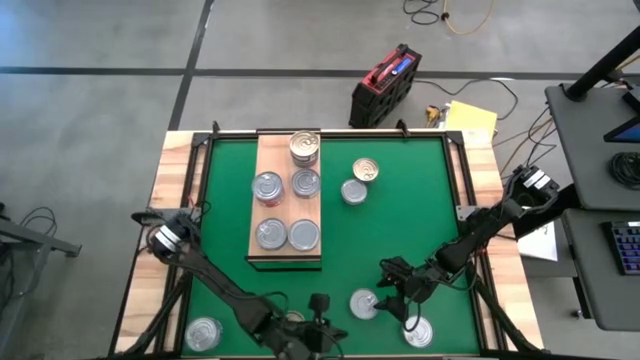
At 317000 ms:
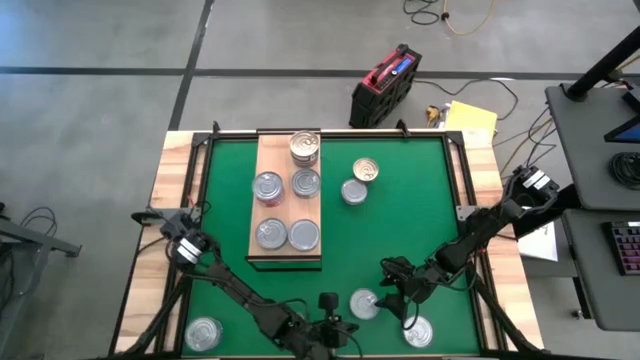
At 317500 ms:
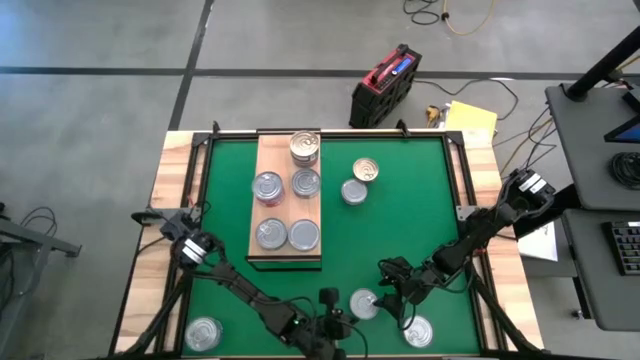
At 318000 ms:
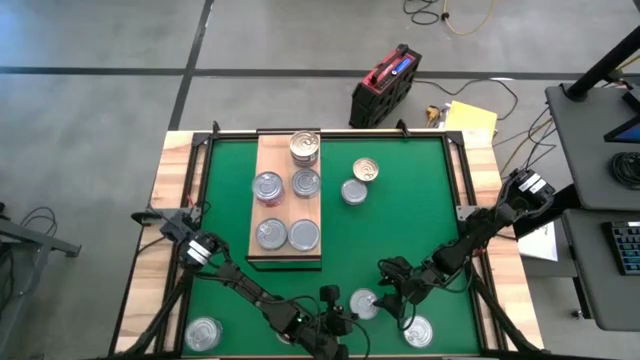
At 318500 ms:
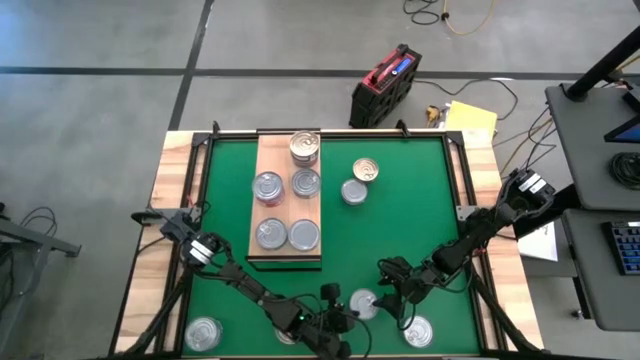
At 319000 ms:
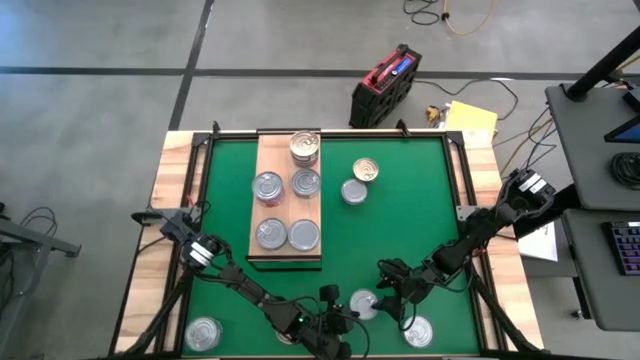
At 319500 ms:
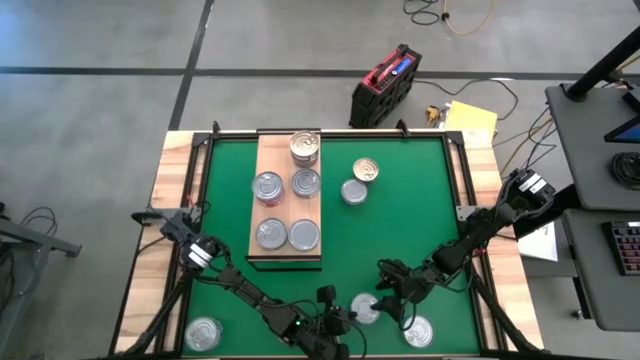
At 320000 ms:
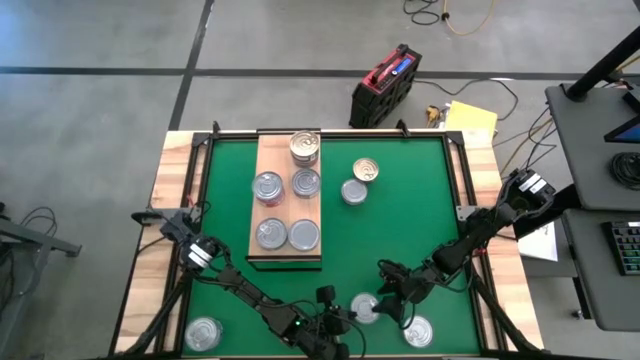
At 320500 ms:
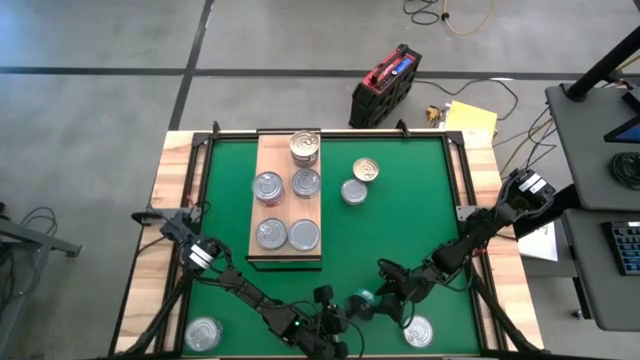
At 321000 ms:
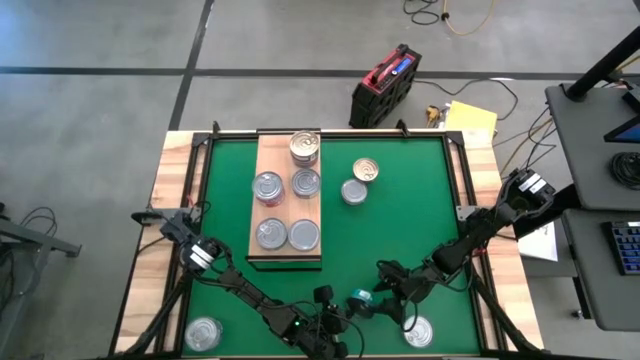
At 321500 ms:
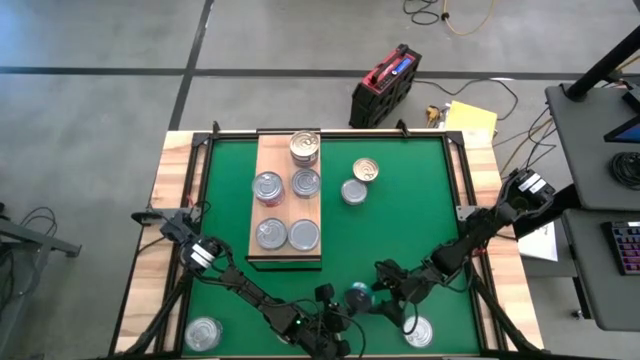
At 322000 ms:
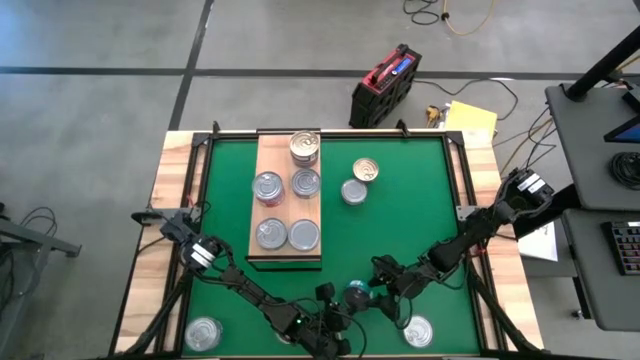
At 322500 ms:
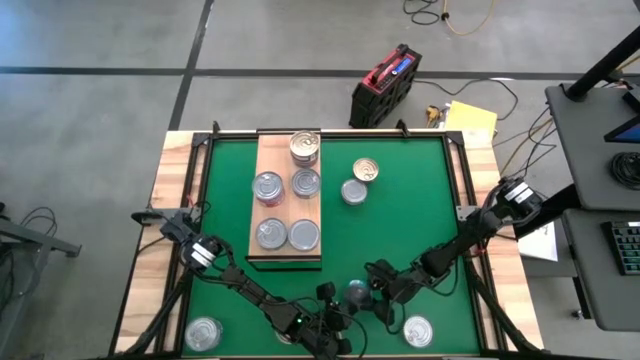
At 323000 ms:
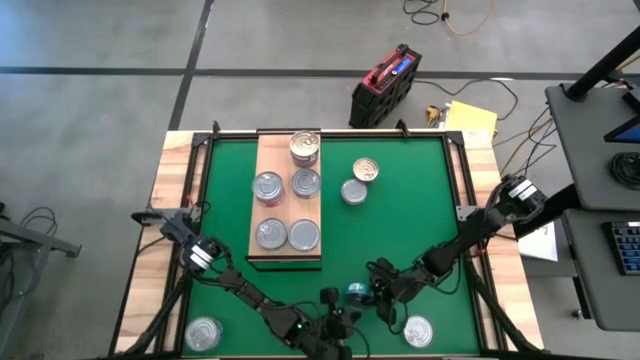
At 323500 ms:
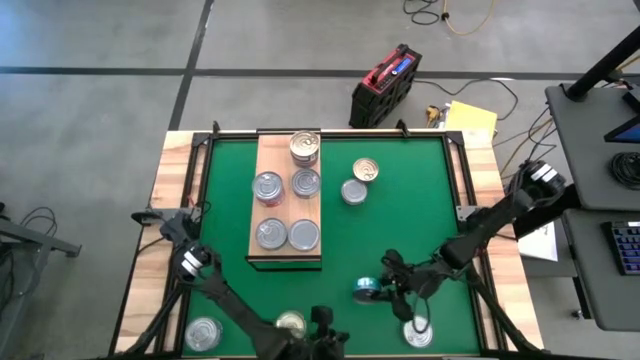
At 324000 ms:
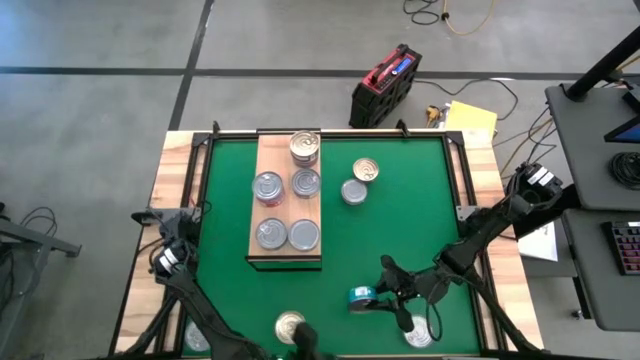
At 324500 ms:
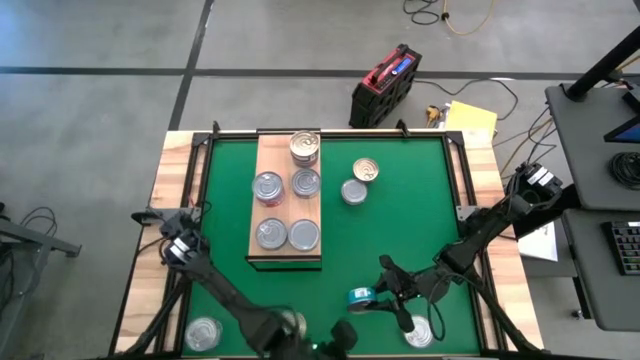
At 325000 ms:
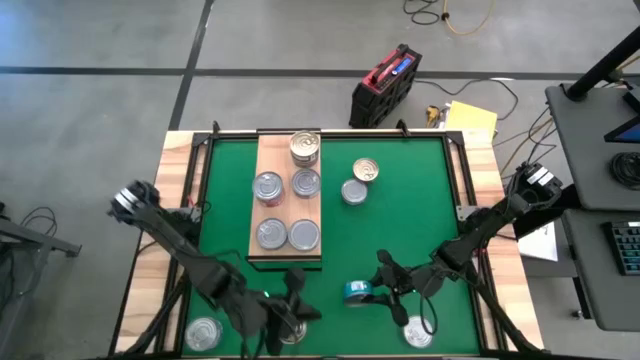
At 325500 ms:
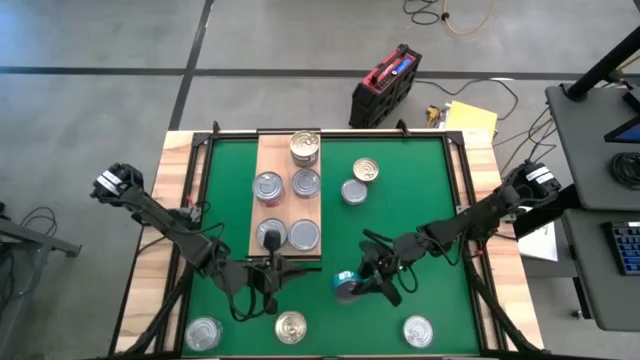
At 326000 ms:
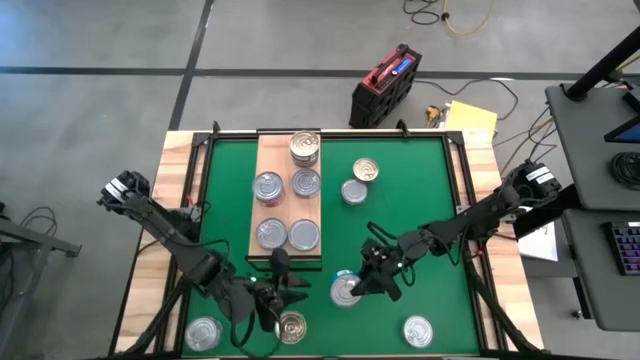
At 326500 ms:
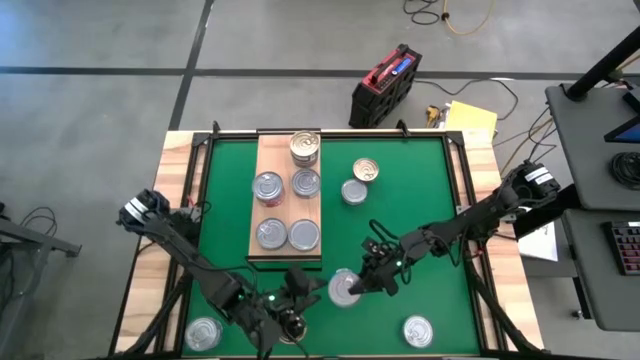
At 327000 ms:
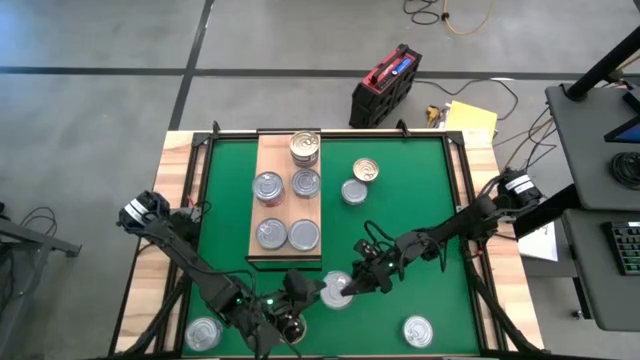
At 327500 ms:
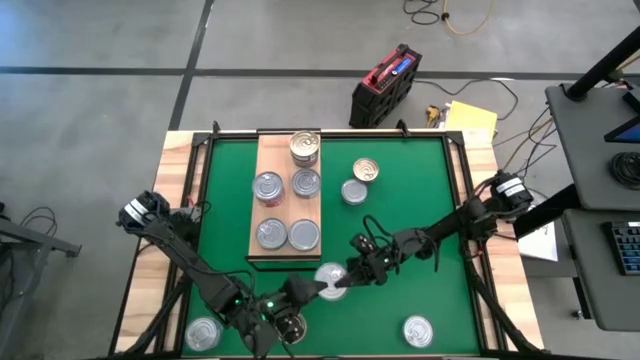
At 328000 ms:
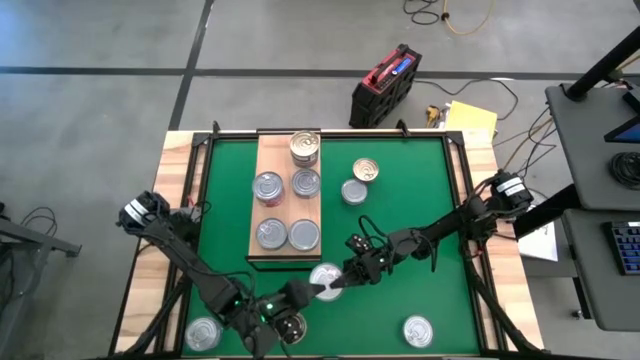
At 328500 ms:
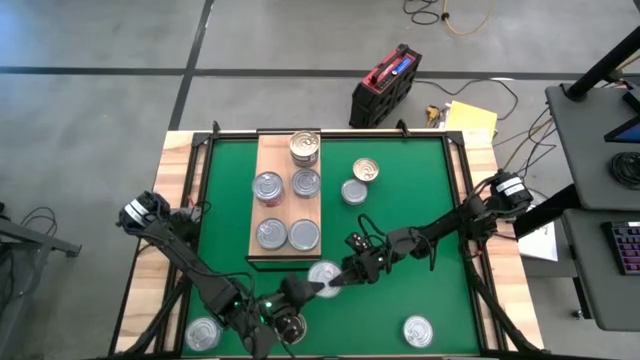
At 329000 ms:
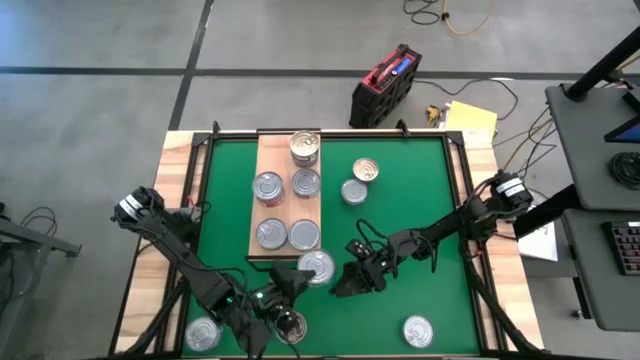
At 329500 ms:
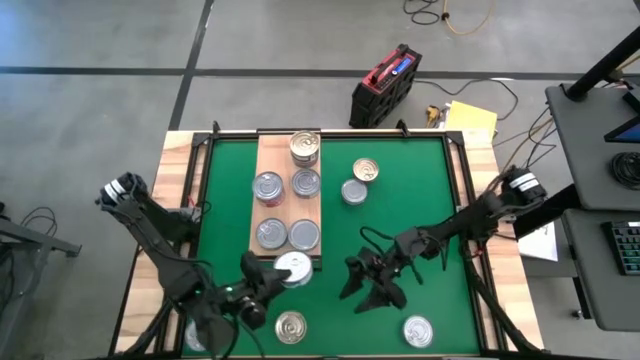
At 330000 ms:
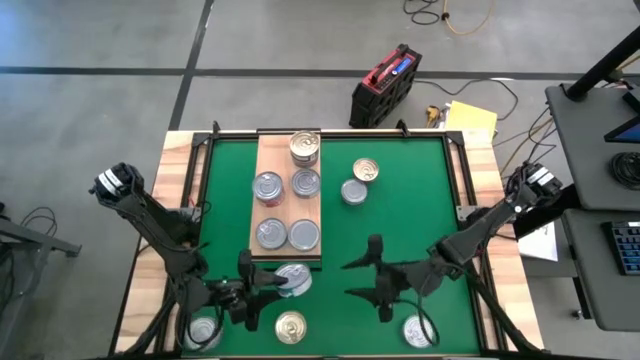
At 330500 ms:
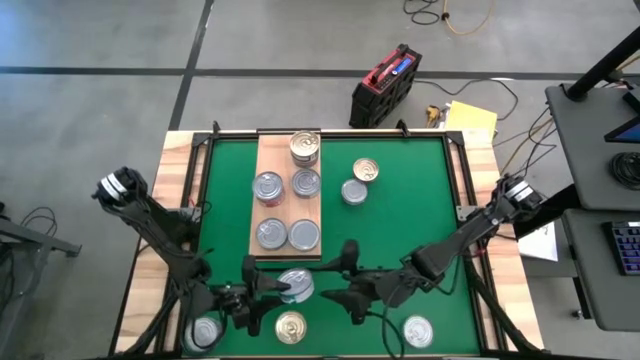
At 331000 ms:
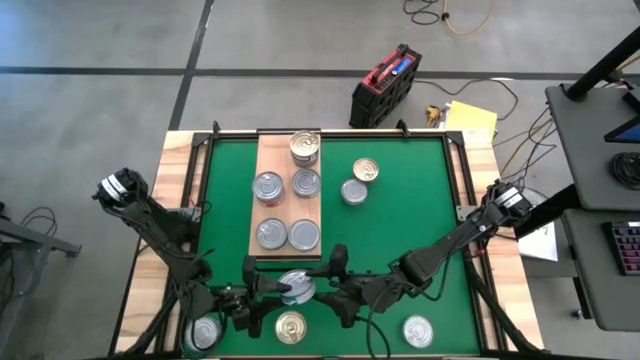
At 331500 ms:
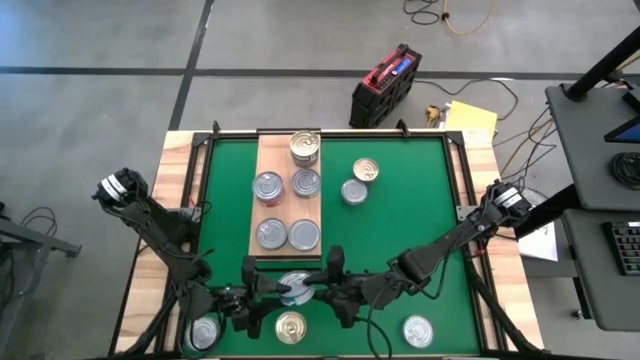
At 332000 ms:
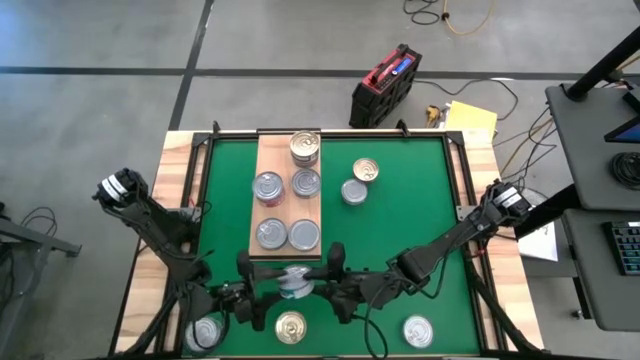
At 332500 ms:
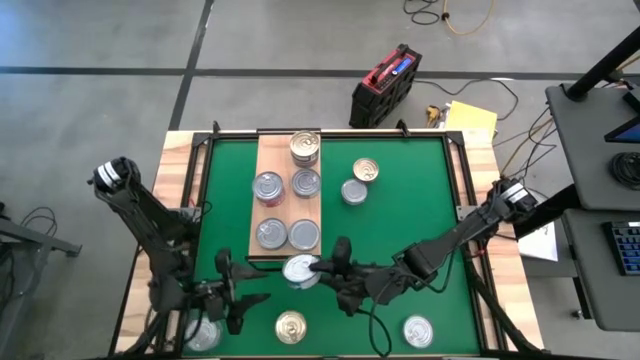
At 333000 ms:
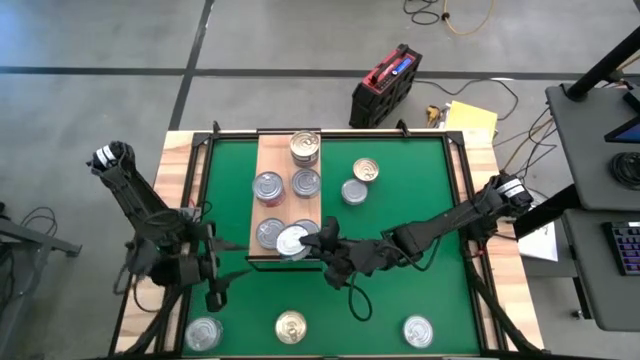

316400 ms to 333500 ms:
Task: Stack canned seafood by type on shelf
Stack the green and blue tuna can on top of the green and blue tuna can on the shelf

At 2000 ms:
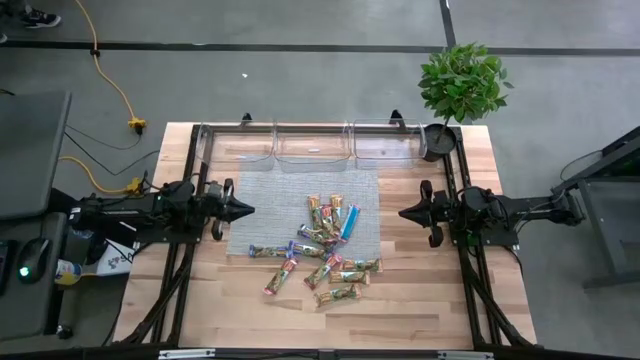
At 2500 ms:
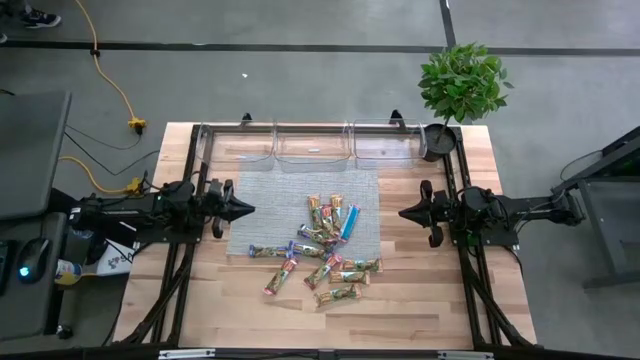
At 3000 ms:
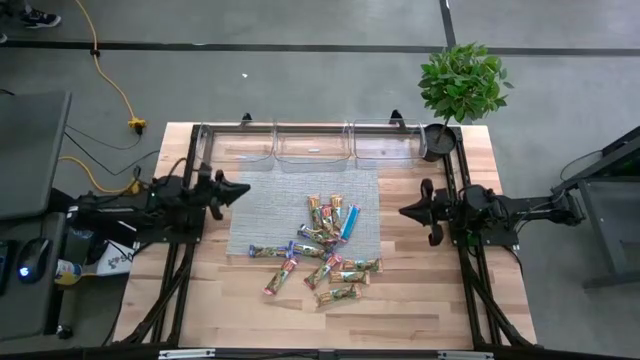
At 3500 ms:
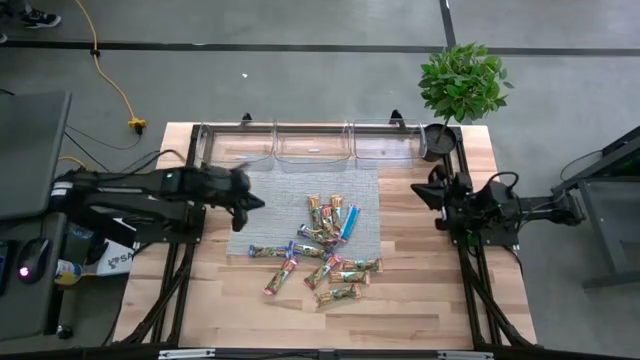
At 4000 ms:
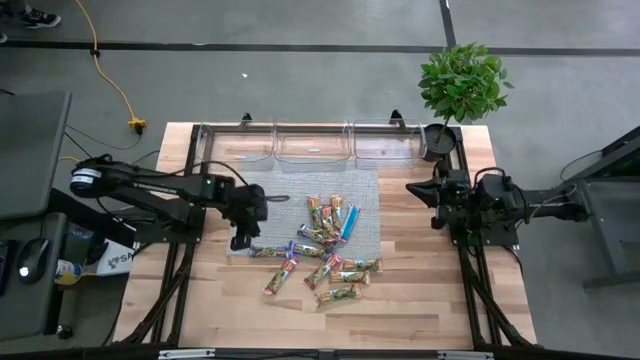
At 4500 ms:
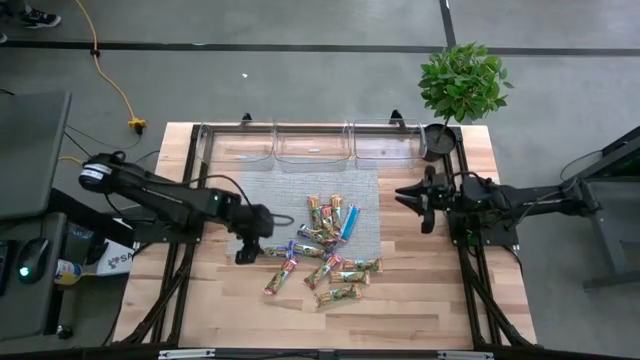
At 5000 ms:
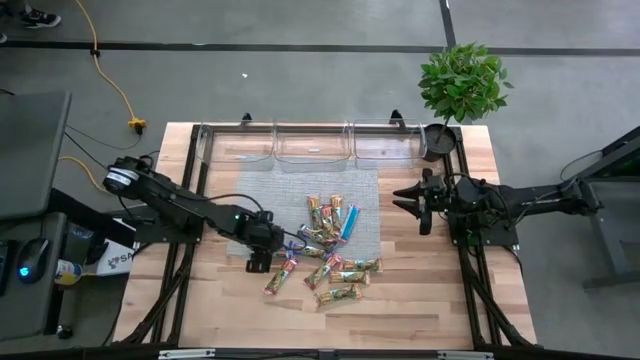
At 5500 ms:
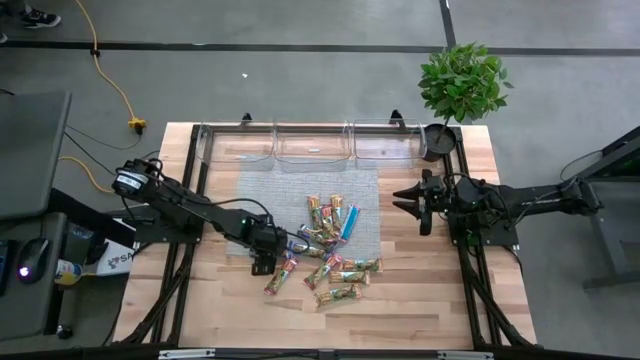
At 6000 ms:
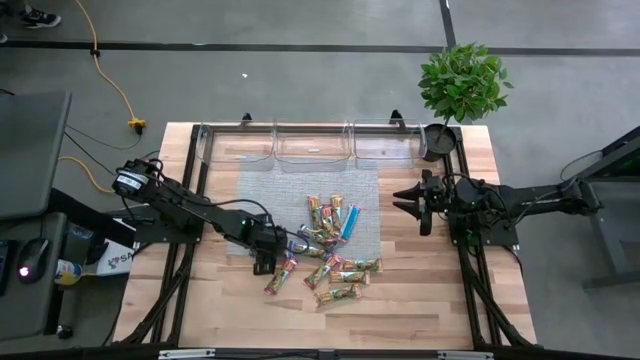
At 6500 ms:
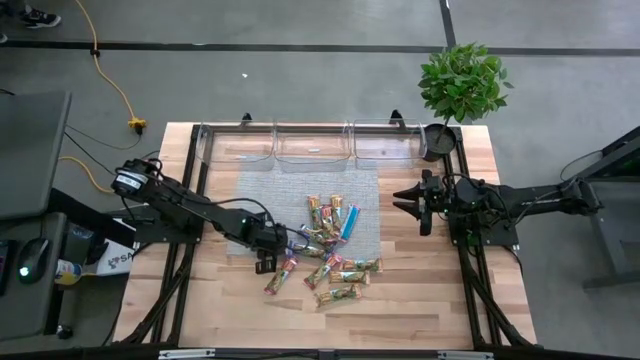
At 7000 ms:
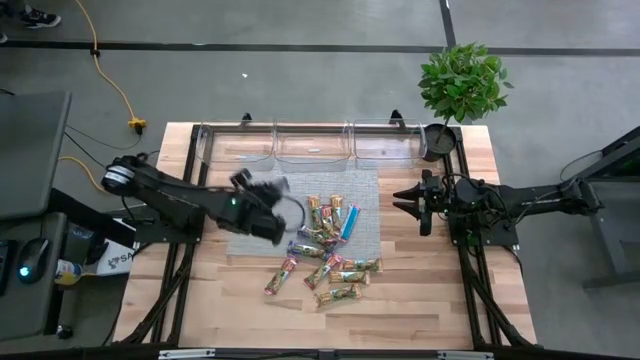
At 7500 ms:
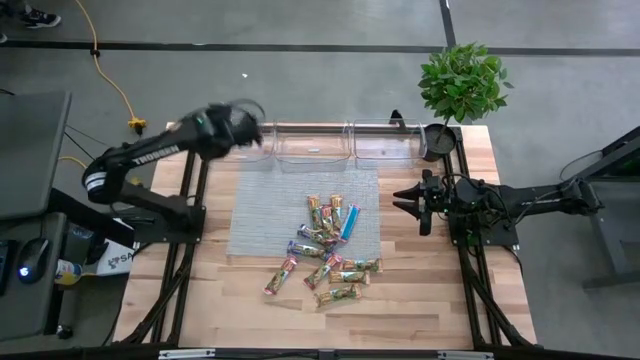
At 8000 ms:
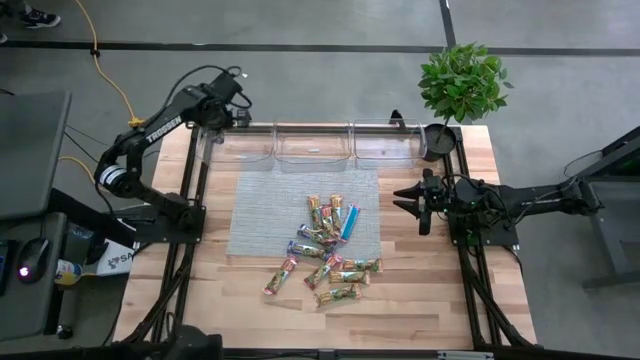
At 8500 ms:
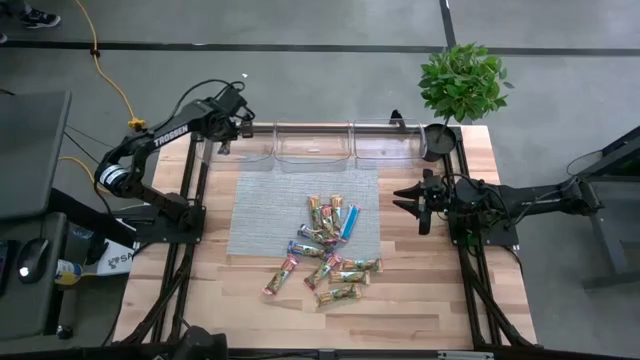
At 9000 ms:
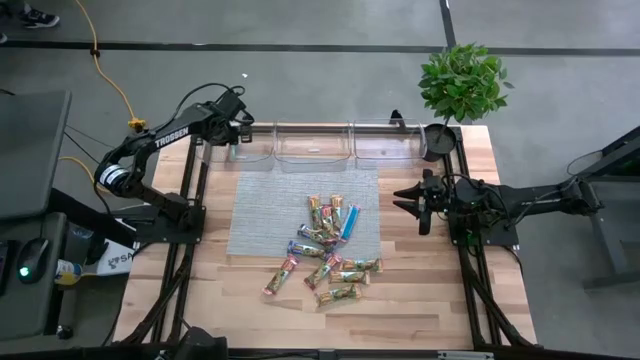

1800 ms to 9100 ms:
Task: Pick and place Granola Bars by type
Put the blue granola bar into the left transparent bin
